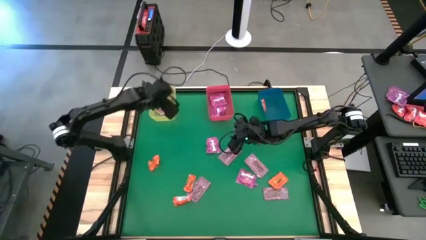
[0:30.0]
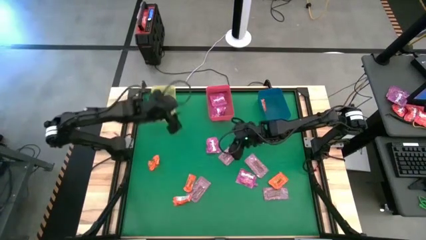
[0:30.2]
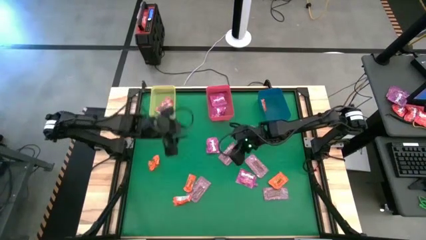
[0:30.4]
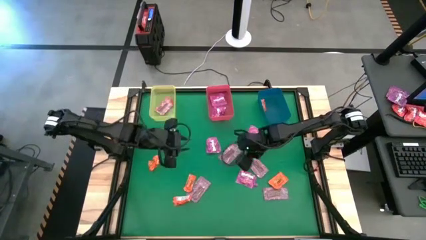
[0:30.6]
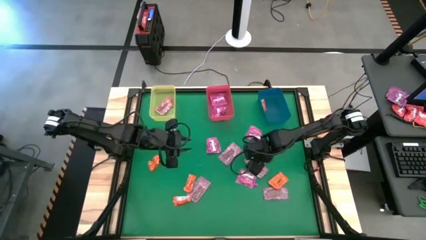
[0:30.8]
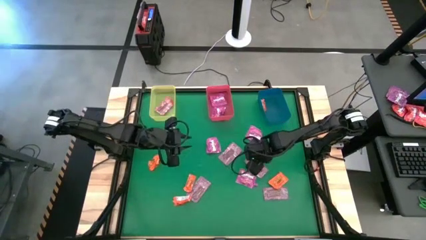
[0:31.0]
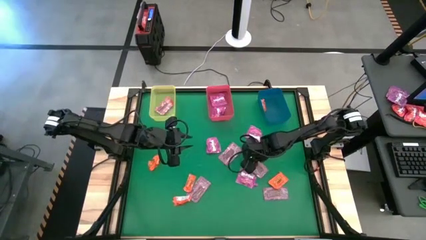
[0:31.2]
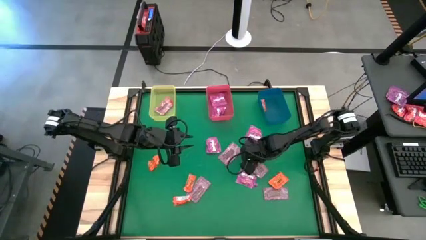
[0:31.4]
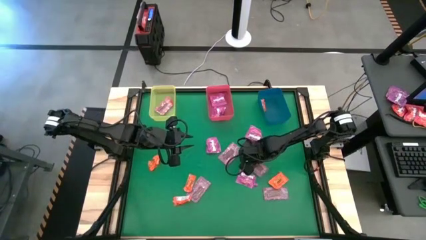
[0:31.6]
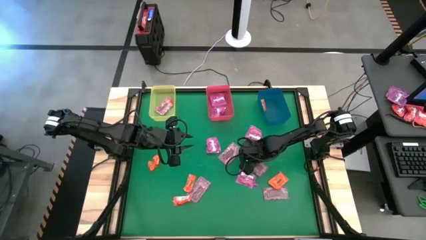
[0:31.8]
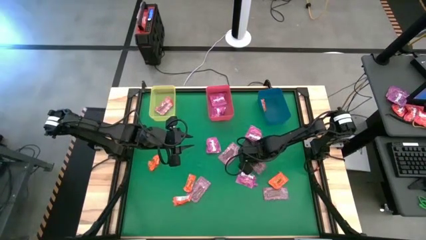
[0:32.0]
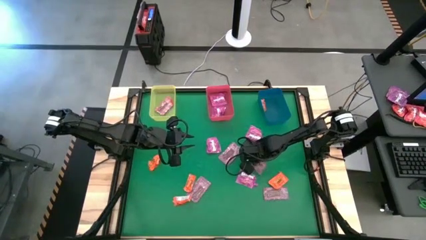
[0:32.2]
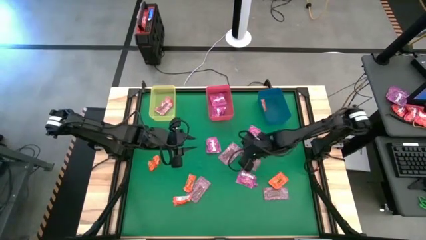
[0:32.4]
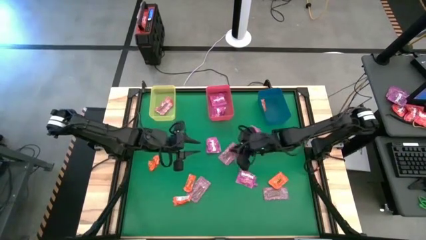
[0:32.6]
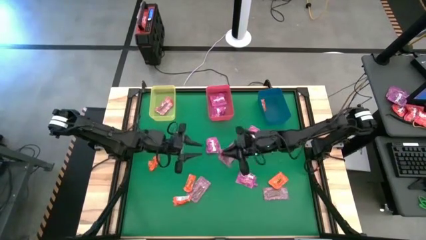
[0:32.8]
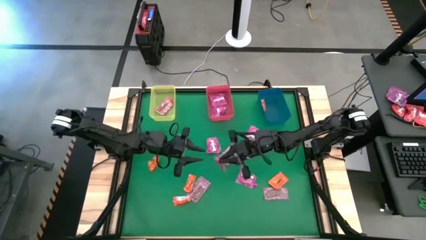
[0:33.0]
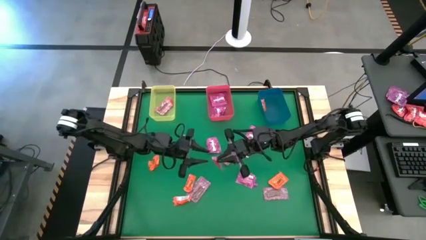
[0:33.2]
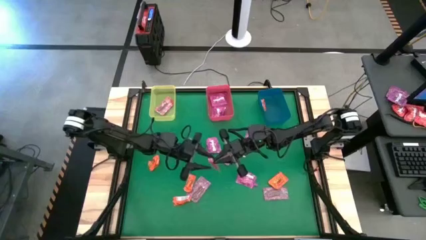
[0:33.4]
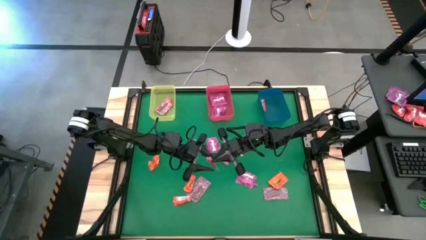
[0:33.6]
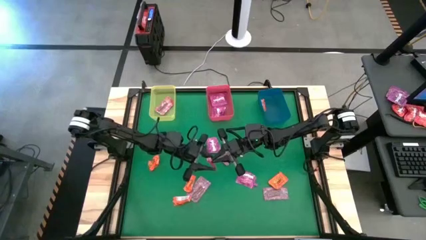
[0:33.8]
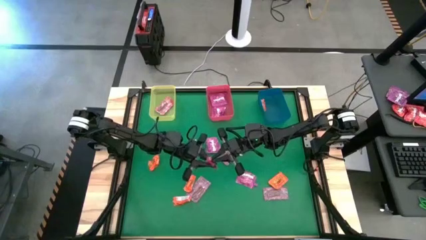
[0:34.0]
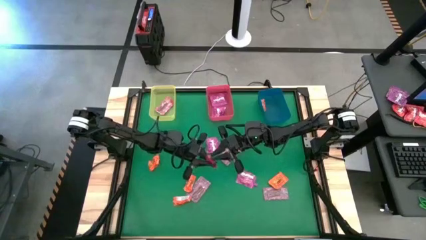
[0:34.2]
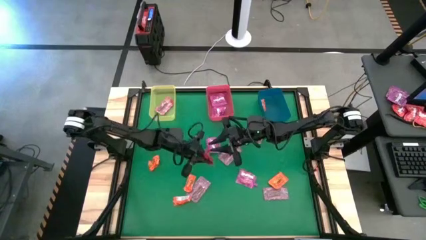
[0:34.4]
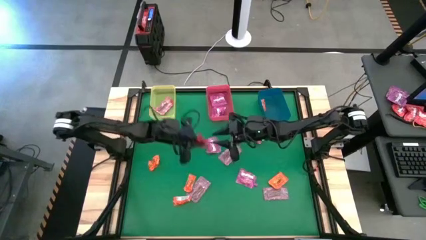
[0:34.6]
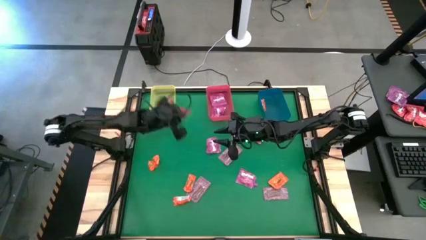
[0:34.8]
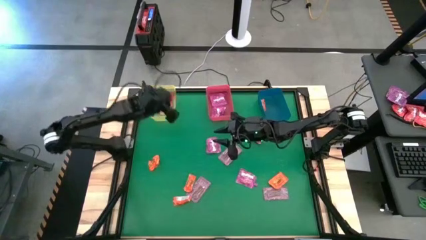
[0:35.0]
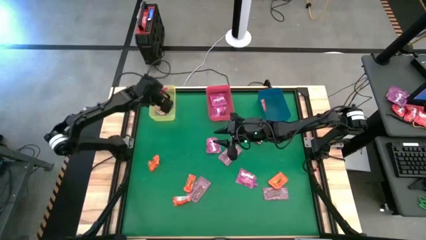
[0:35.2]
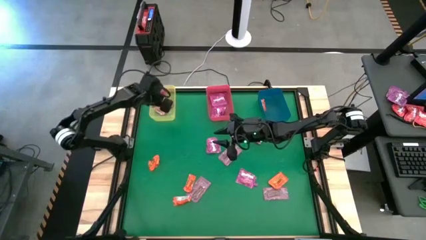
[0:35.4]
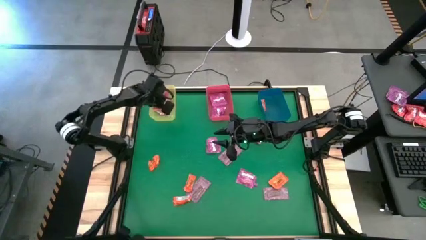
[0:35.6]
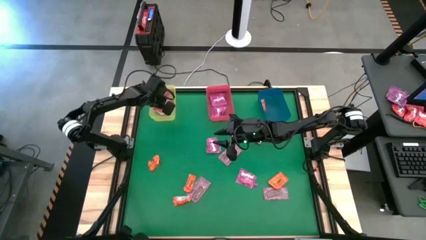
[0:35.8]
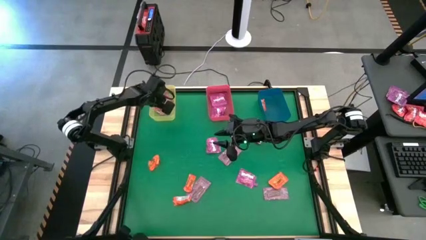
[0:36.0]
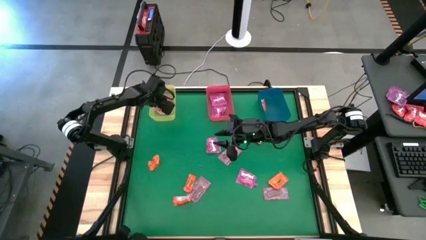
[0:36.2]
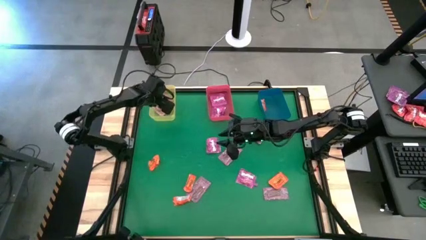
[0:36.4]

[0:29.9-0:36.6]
Task: Sort candy by brand, put in halloween buckets
Put the pink candy into the yellow bin

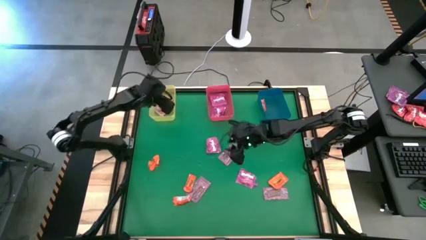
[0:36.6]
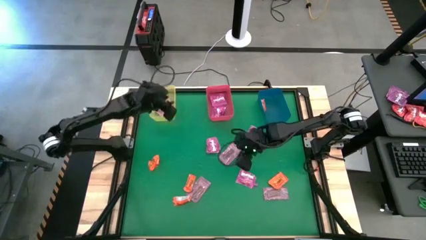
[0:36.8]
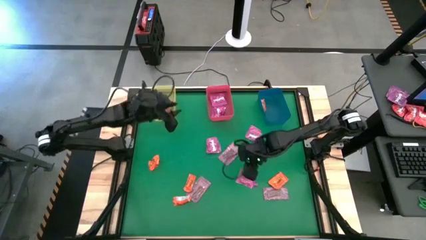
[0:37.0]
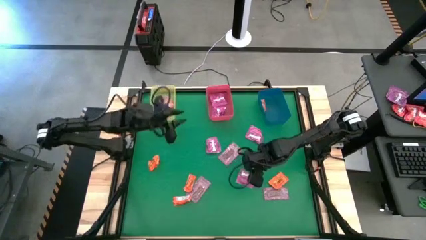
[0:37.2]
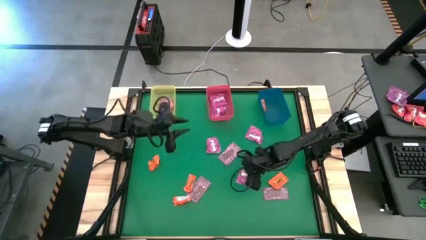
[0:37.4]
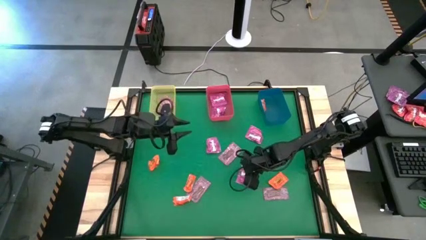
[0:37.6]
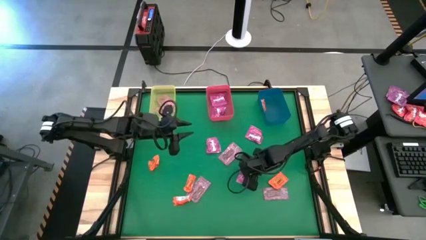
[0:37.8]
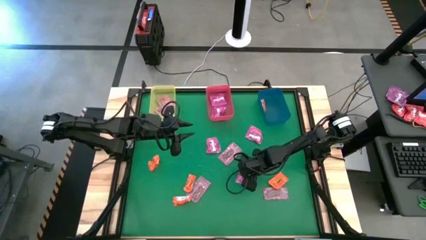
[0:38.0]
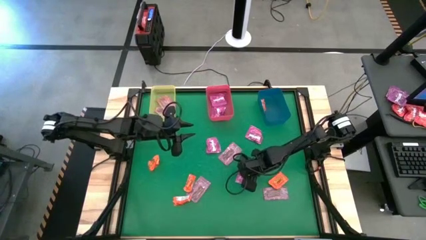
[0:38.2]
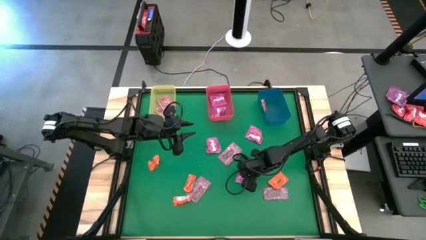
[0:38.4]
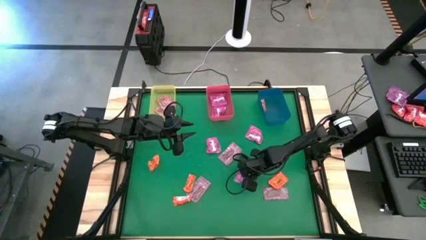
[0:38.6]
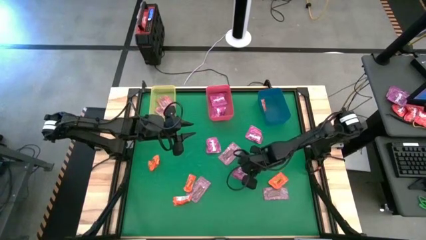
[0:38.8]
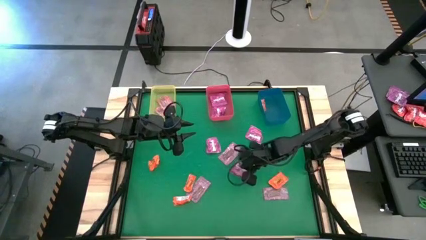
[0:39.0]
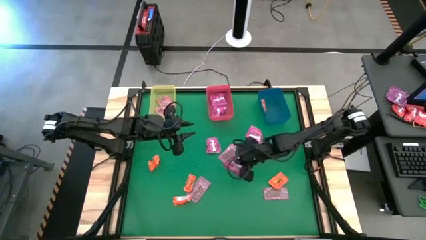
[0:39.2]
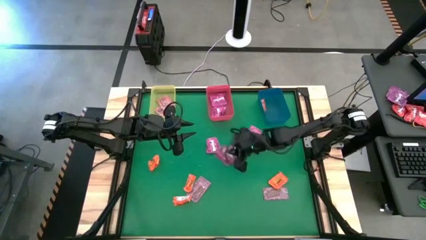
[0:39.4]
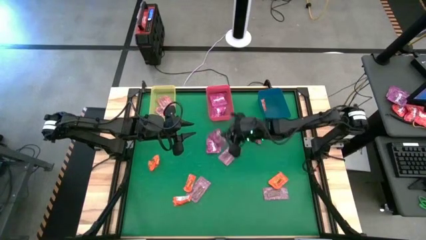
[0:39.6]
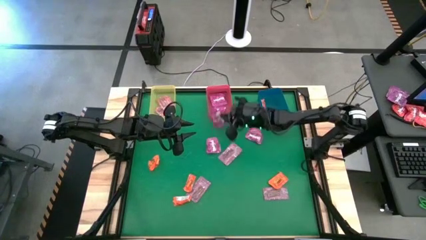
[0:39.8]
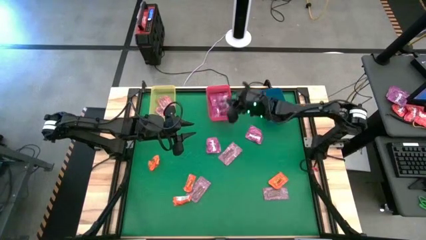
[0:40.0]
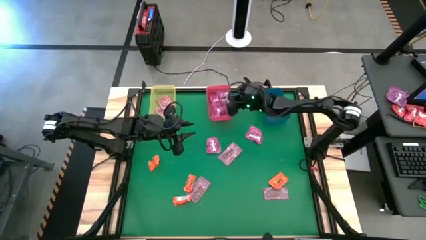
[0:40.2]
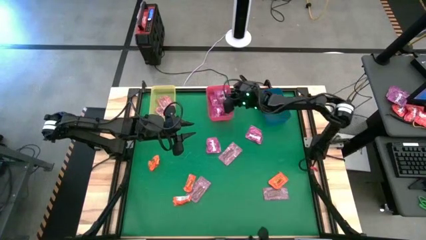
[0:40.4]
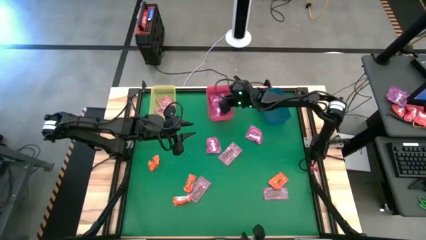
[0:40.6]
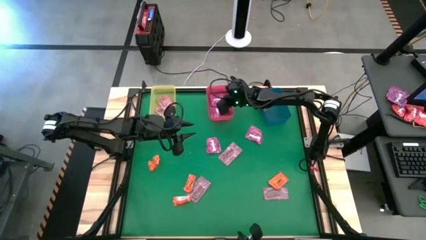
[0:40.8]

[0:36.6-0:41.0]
Put the violet candy into the pink bin

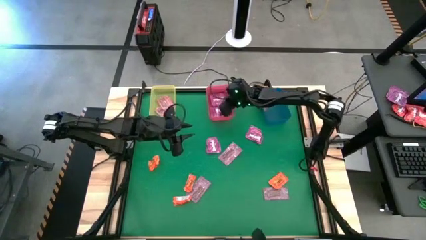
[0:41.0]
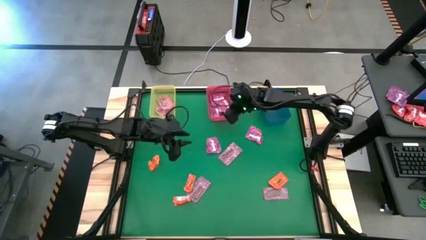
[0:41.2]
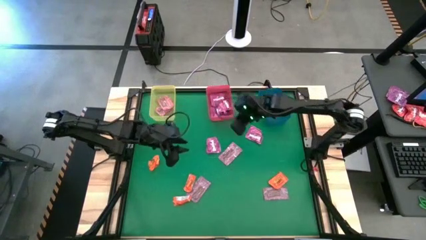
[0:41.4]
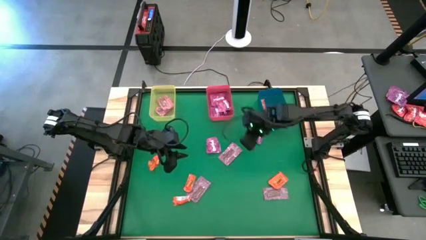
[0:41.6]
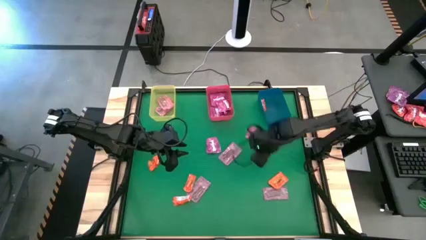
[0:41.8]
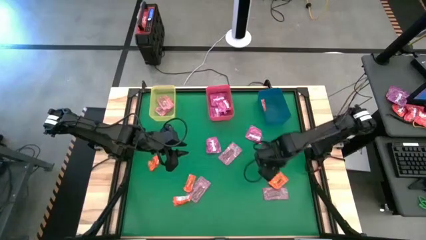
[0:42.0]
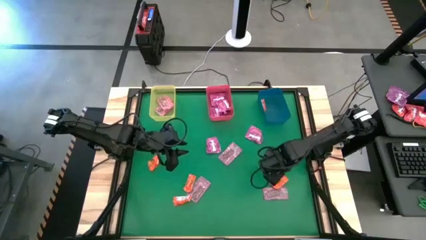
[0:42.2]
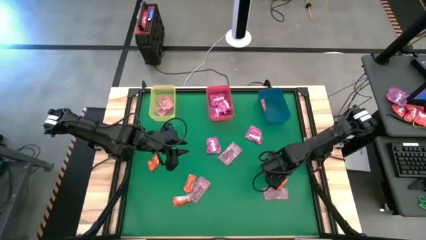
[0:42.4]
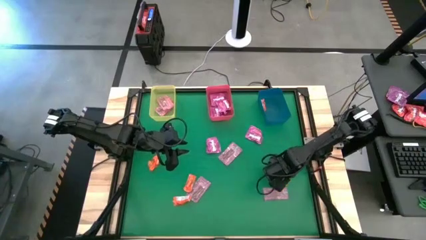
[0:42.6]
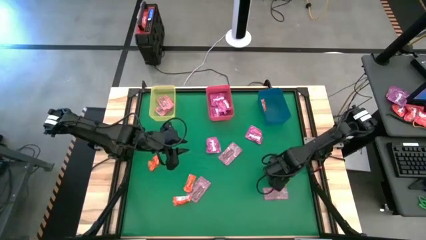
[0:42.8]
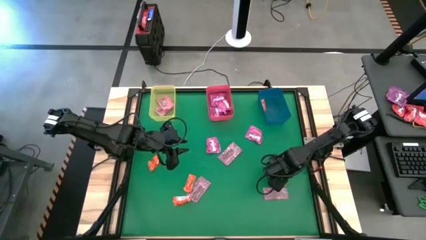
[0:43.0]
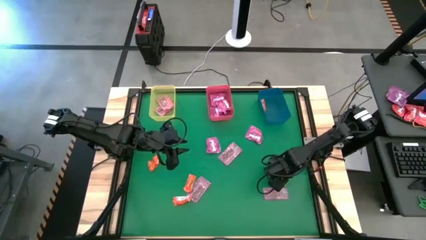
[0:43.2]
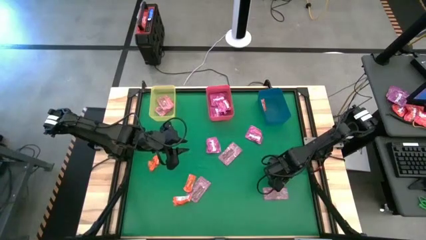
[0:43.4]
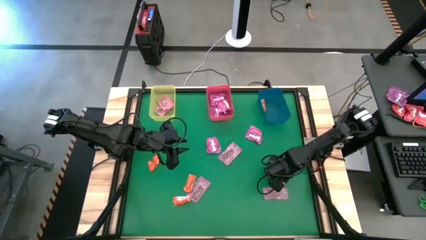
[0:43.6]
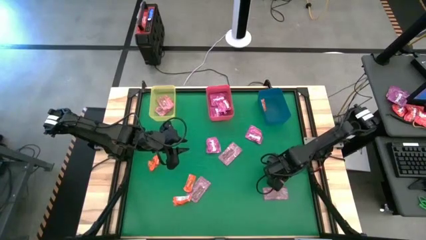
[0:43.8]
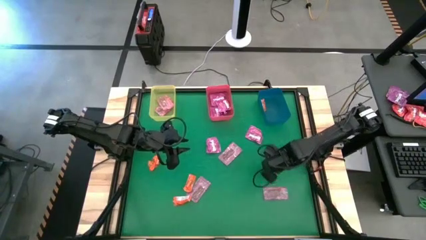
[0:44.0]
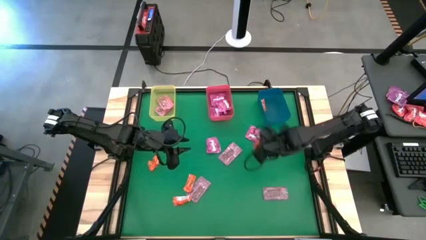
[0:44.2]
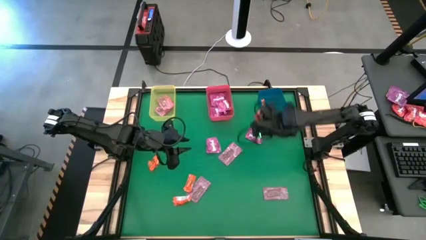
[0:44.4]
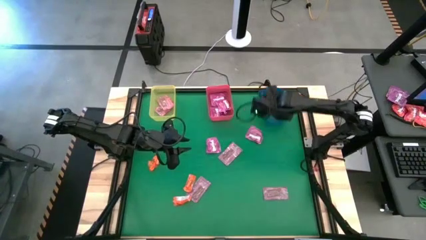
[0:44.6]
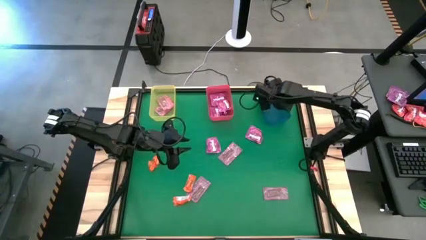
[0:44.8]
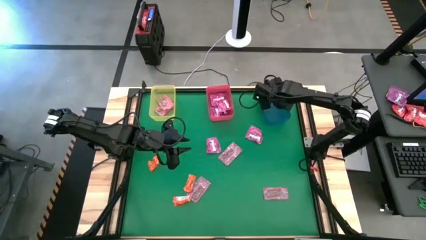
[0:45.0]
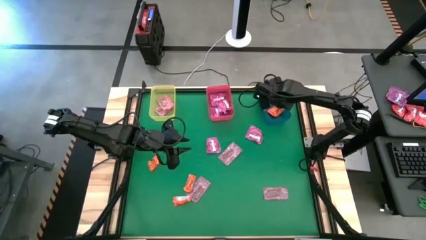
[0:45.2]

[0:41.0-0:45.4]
Put the orange candy into the blue bin

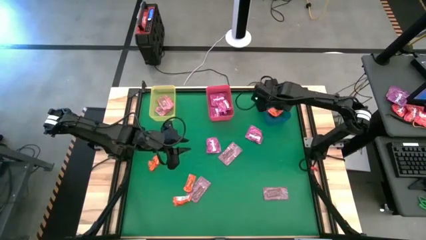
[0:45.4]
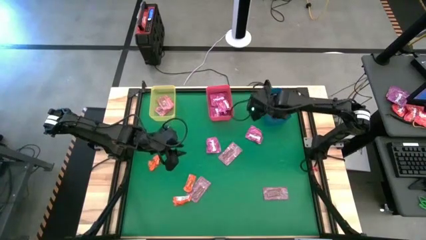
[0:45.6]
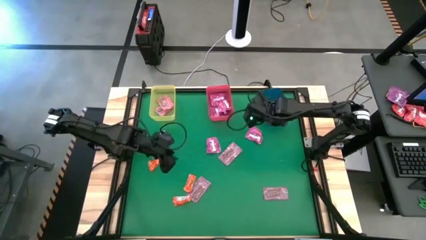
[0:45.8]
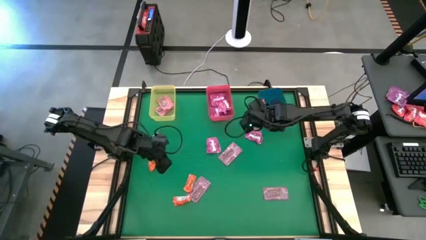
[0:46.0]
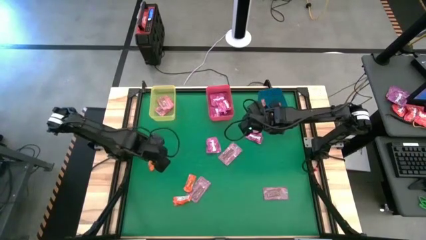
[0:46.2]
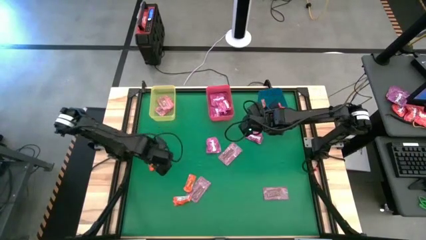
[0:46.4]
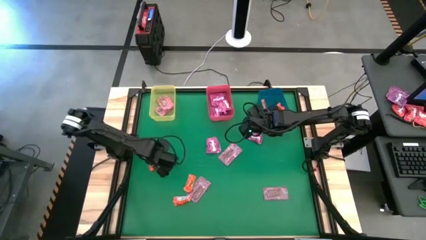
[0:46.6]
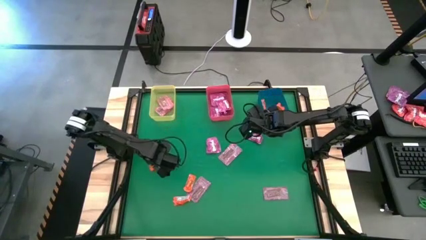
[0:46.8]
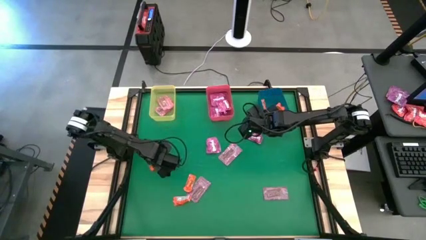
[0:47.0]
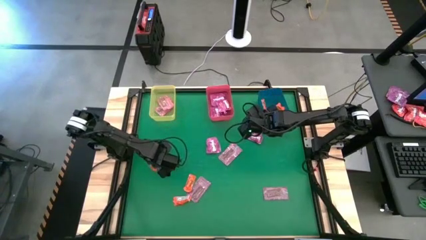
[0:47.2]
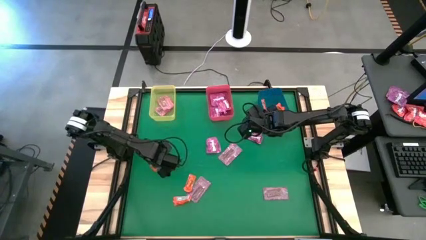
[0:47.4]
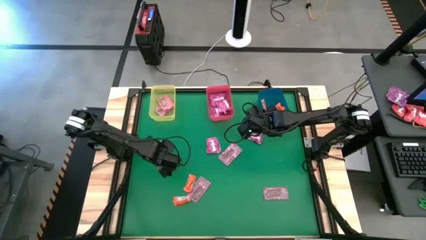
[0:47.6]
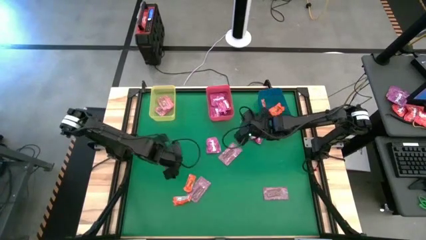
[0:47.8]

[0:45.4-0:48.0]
Put the orange candy into the blue bin
